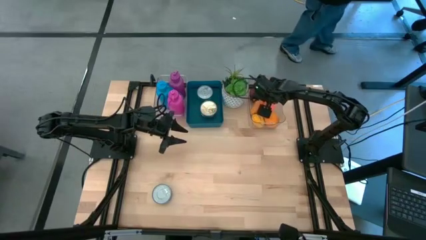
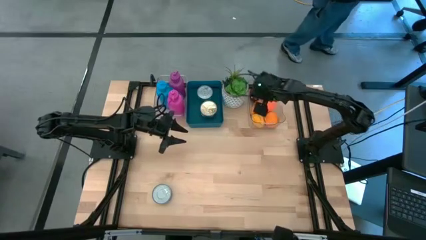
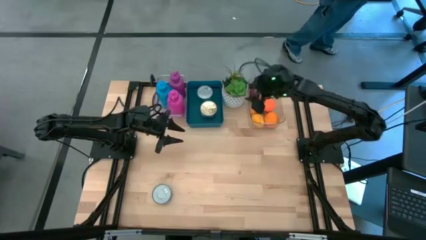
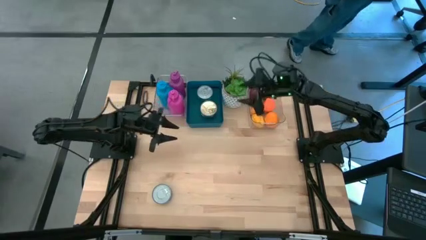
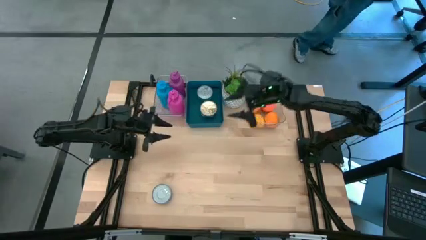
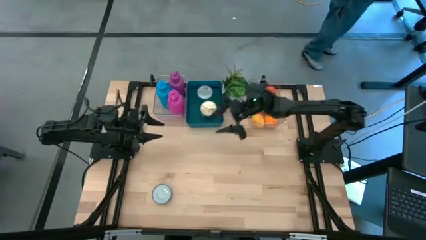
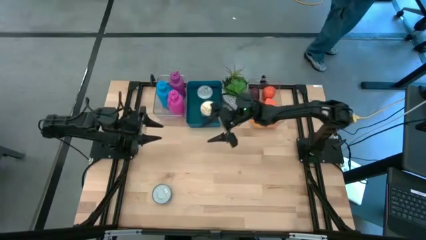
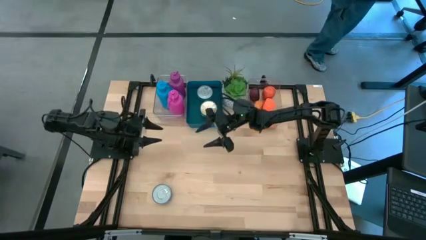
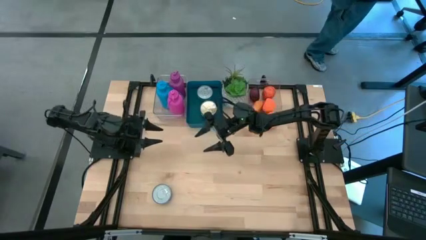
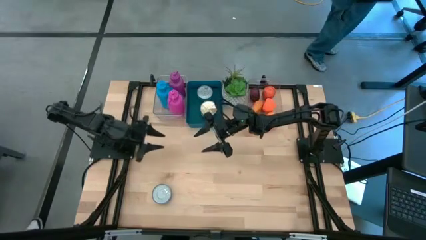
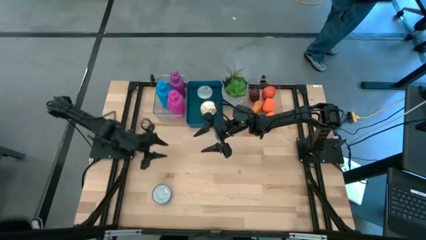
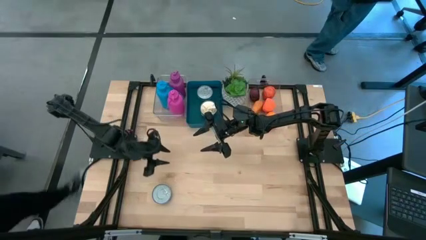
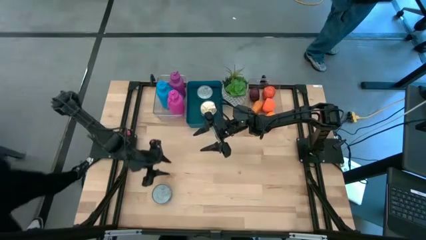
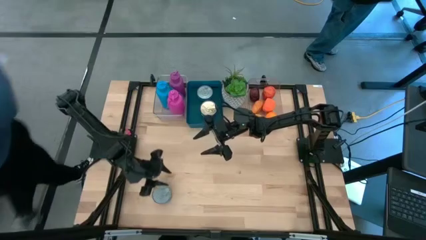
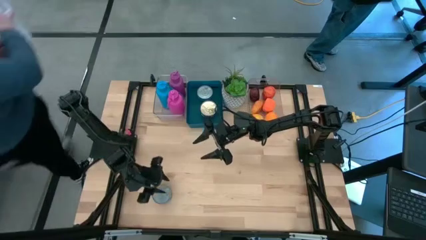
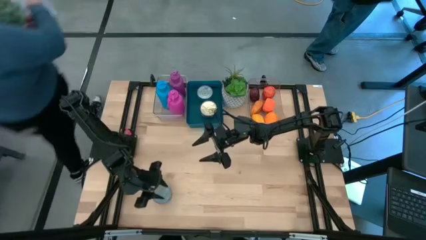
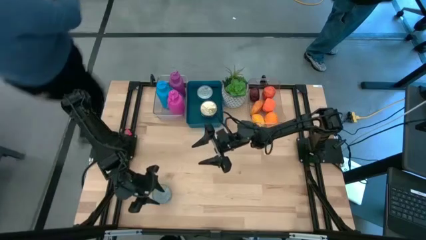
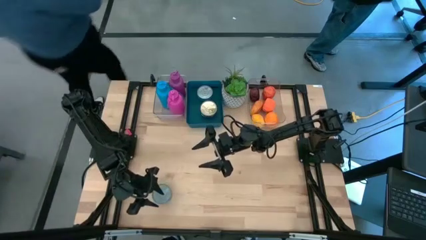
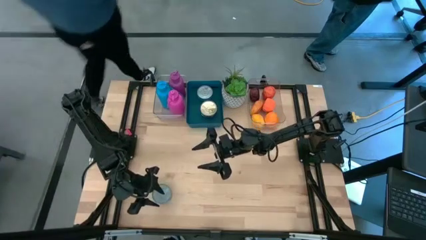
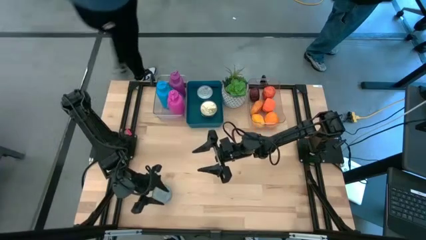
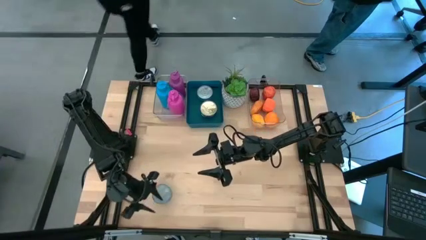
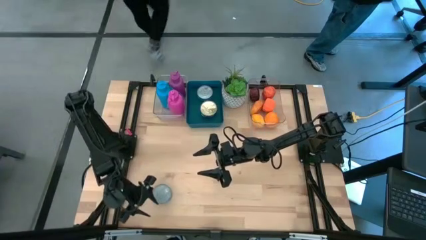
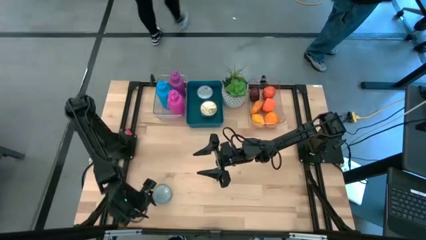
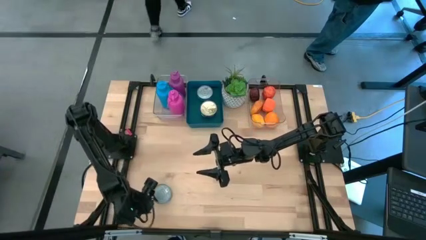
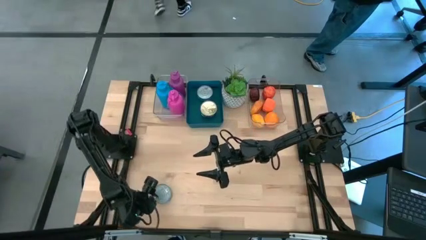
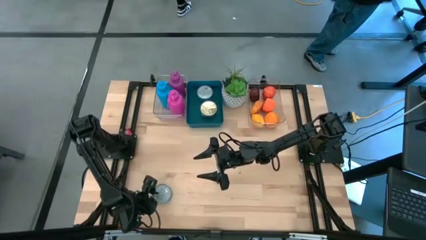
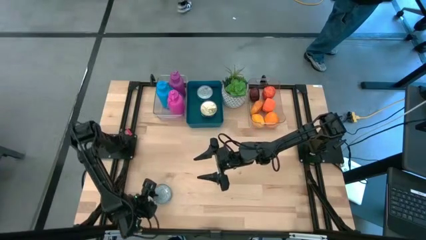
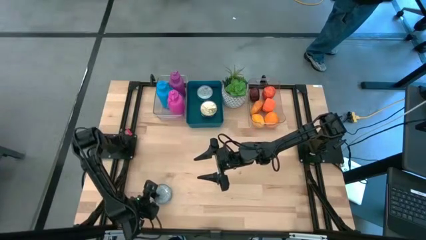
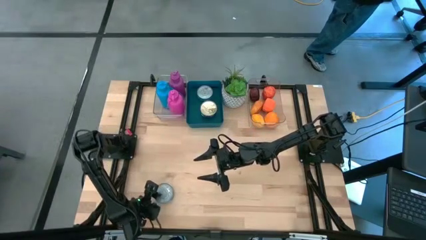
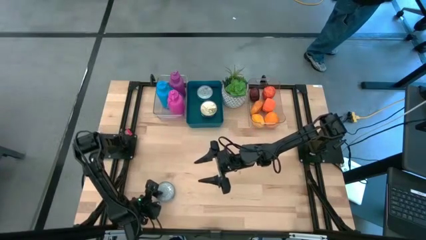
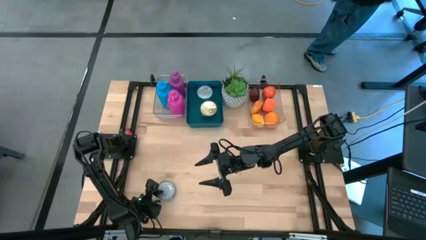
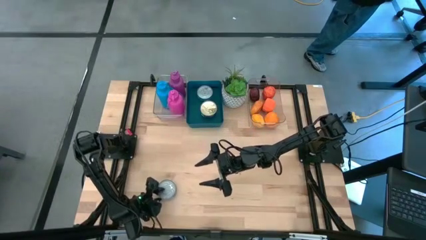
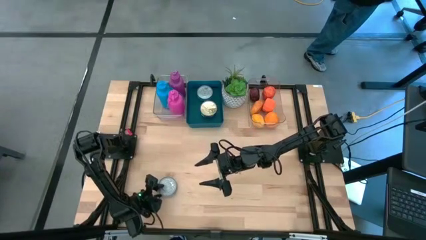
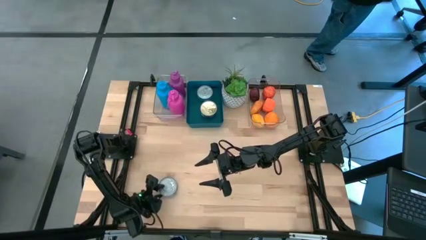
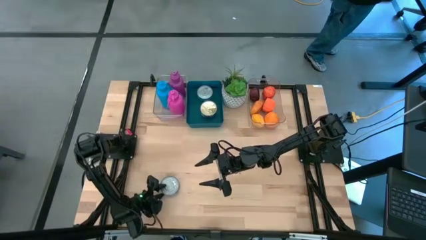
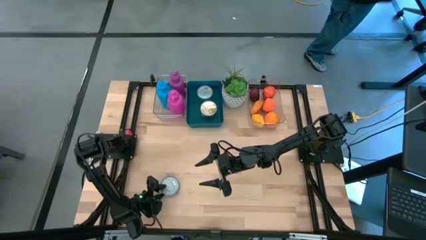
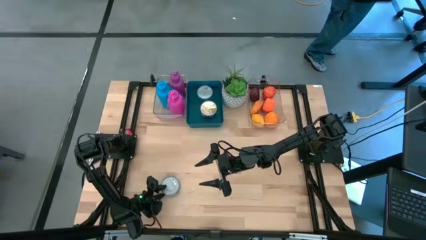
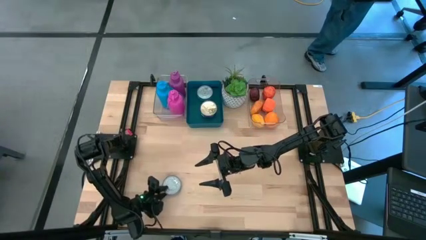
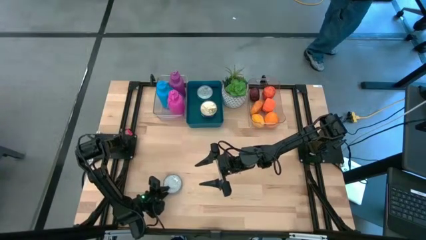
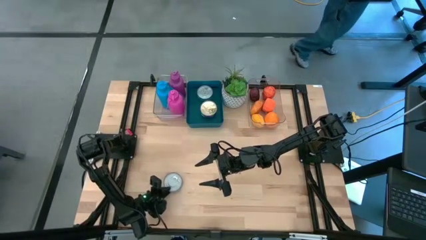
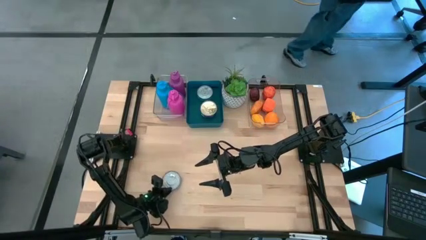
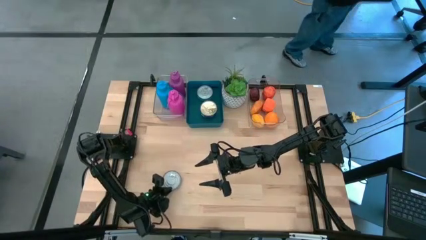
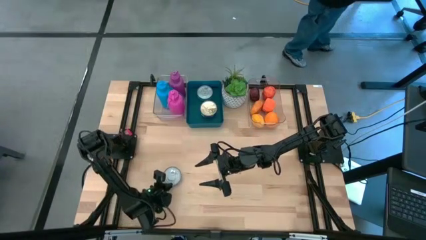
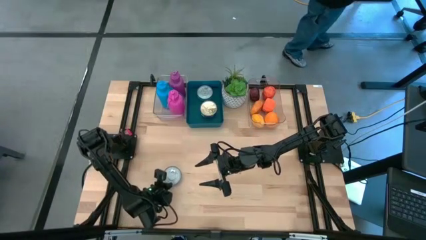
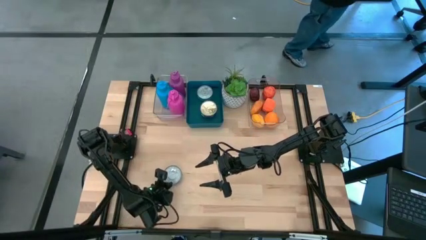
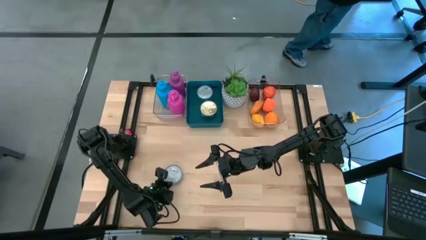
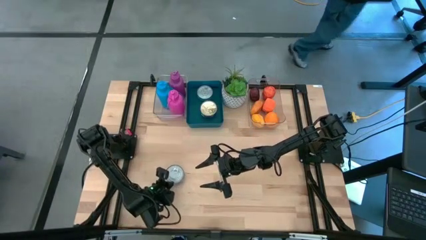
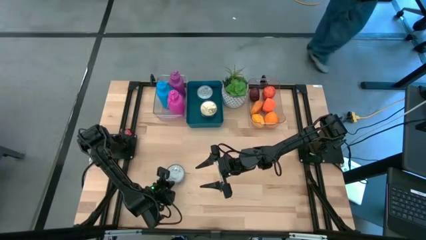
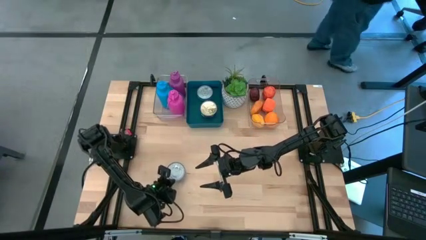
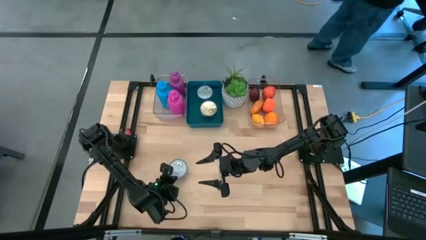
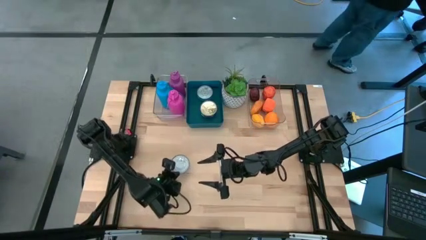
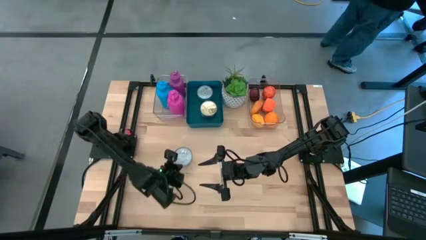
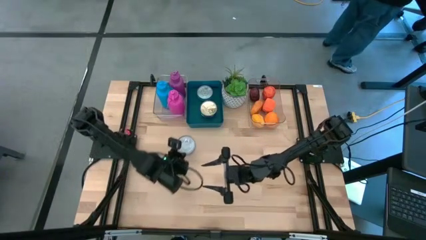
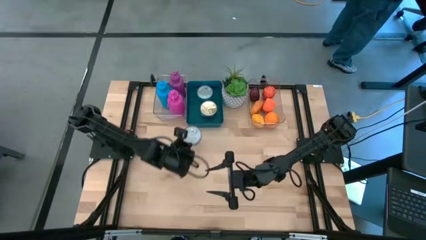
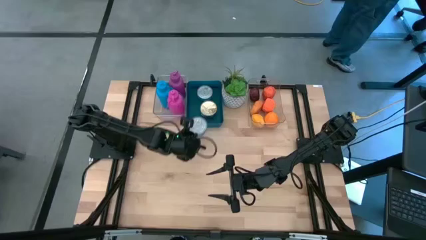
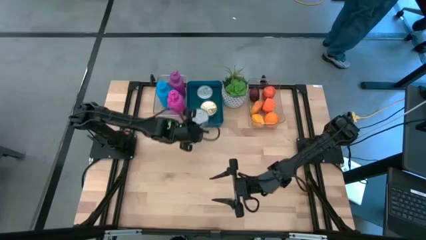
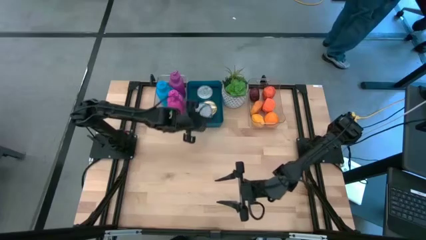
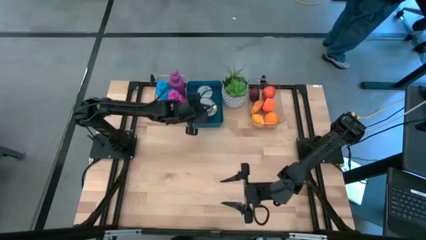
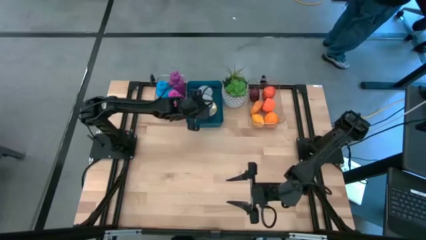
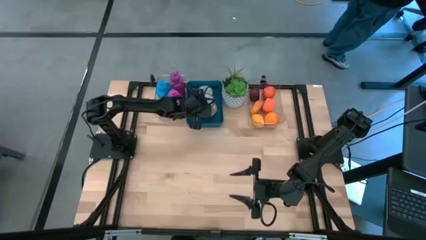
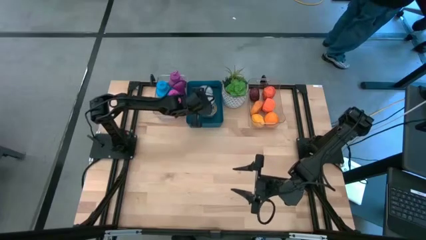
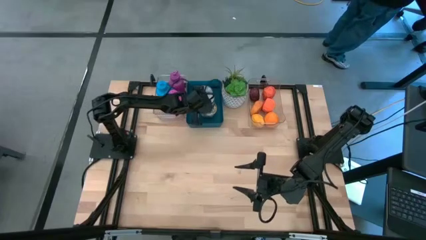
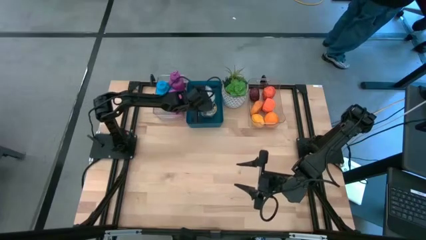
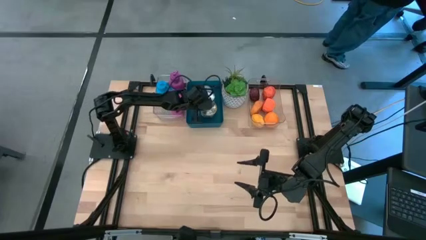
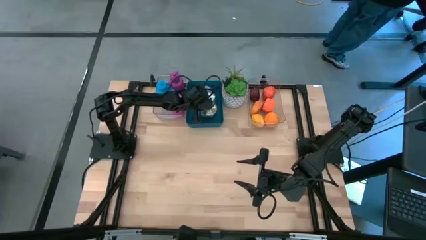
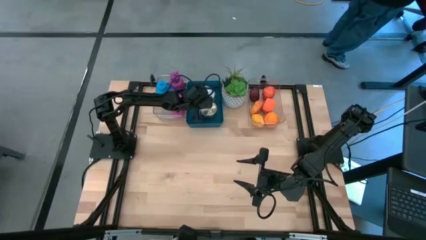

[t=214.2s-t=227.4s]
Task: Pick & Place Food Item
Put the blue tuna can into the blue bin

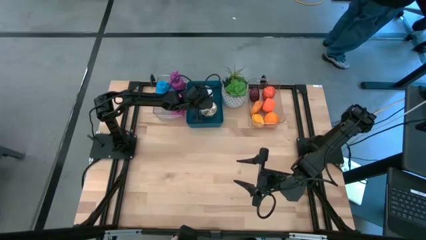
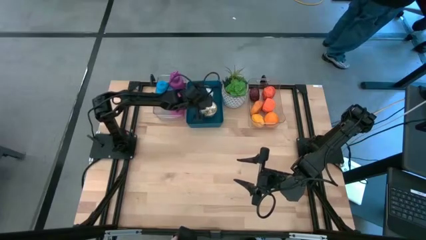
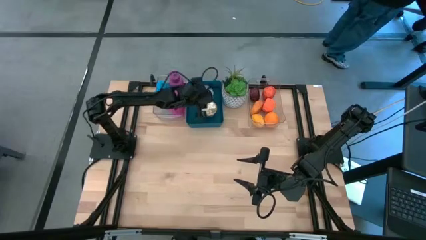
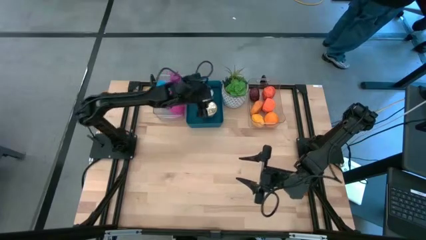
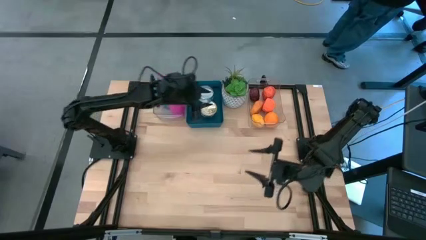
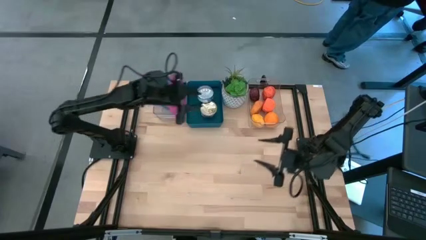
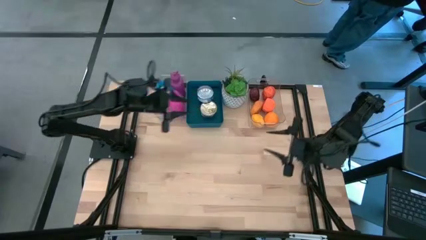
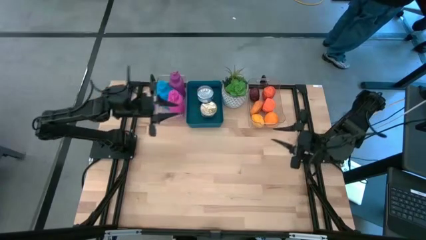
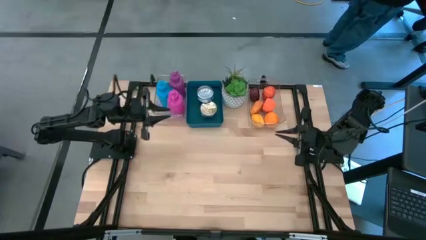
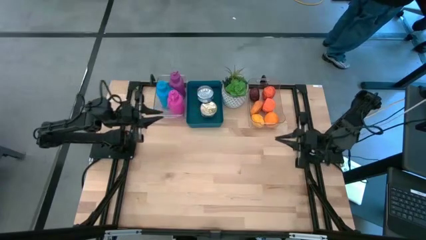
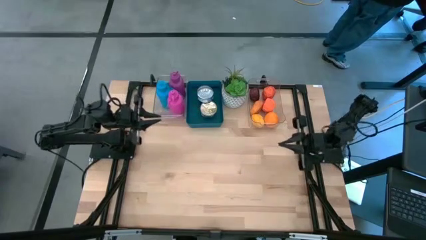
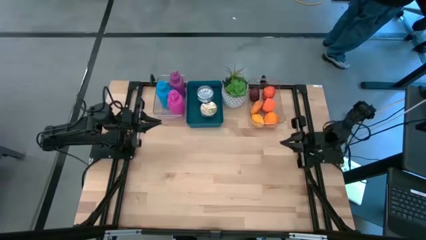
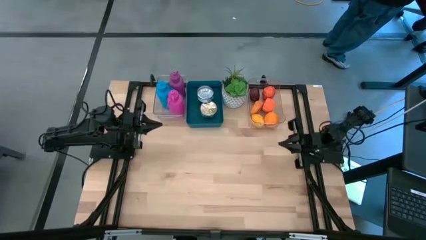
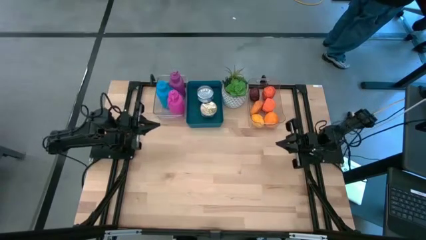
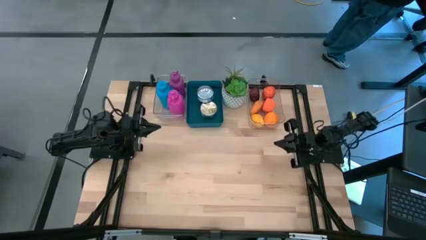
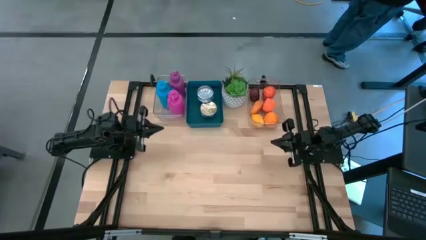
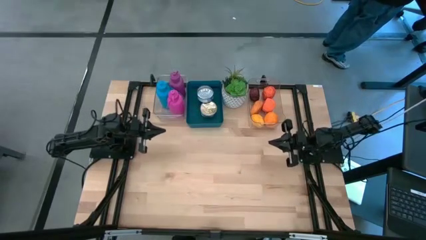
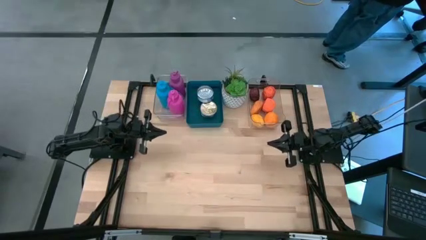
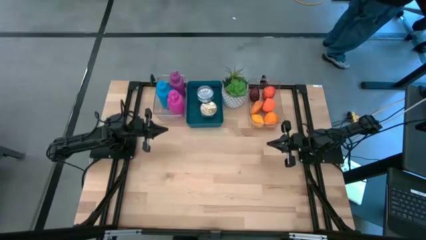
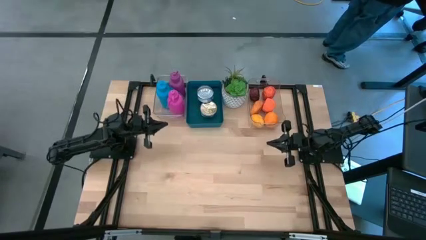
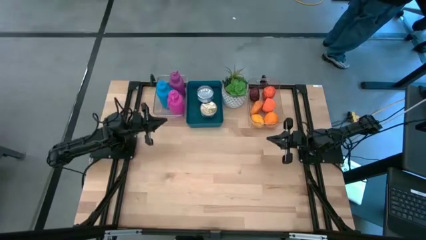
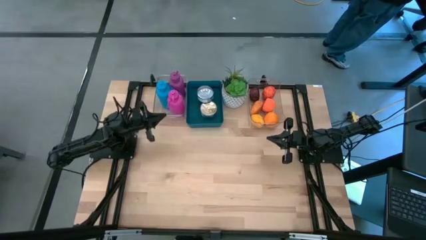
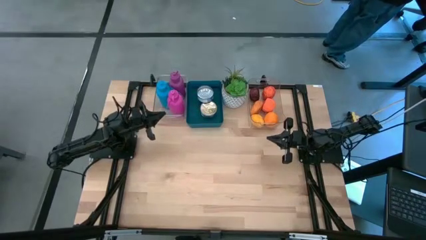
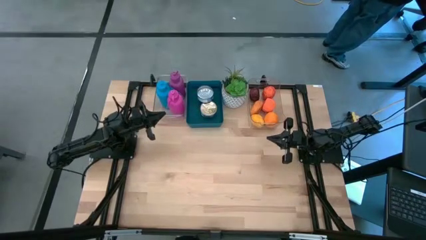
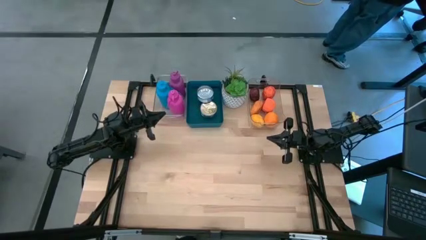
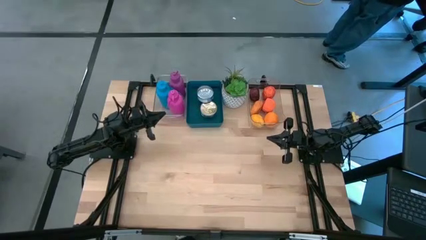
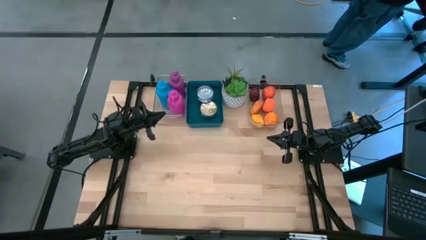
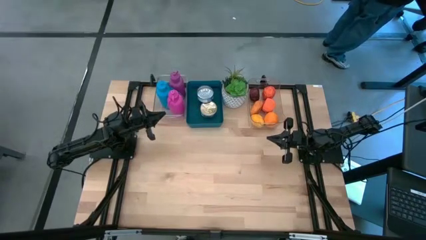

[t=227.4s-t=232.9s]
Return to Home Position
